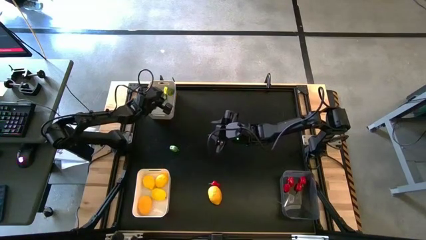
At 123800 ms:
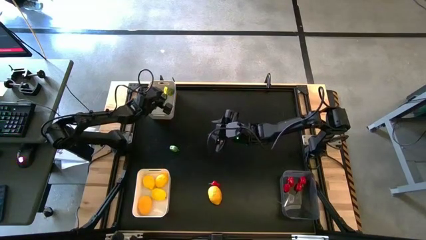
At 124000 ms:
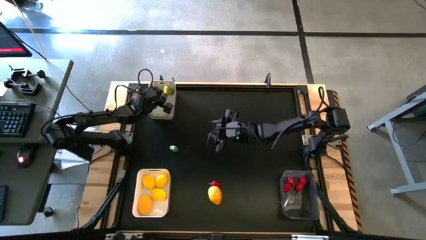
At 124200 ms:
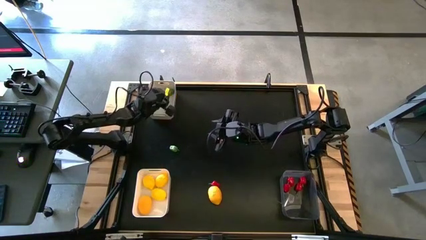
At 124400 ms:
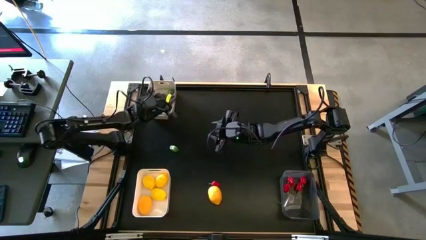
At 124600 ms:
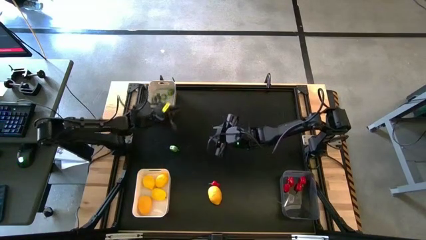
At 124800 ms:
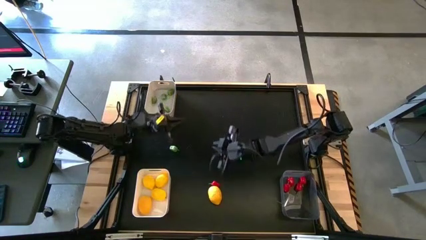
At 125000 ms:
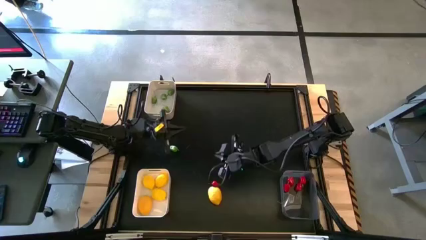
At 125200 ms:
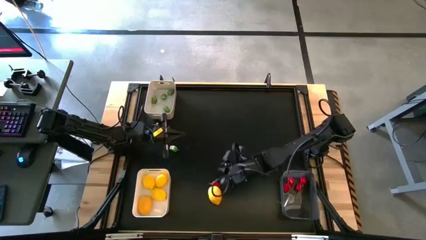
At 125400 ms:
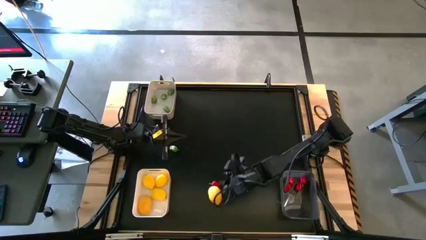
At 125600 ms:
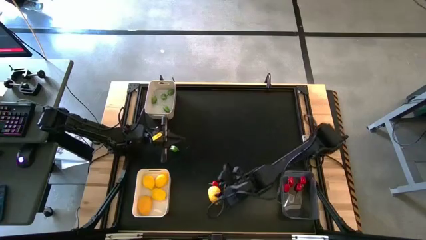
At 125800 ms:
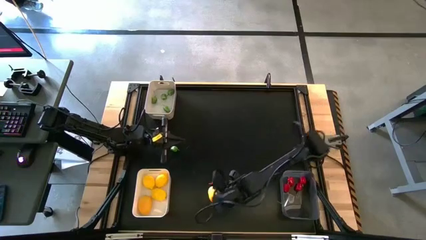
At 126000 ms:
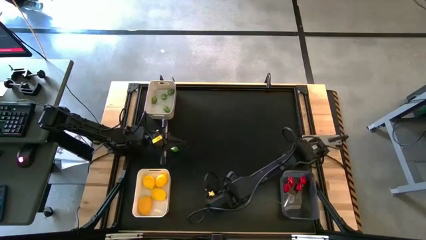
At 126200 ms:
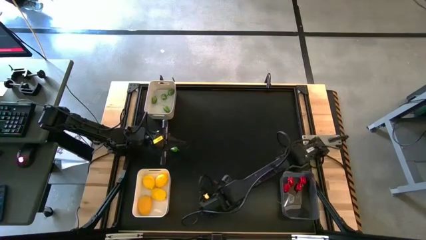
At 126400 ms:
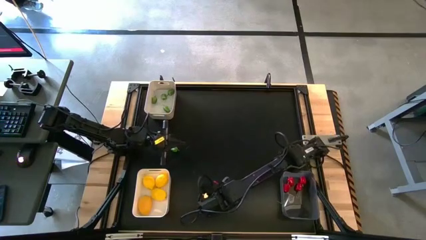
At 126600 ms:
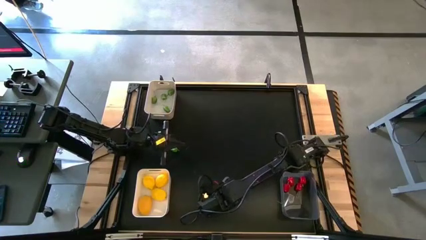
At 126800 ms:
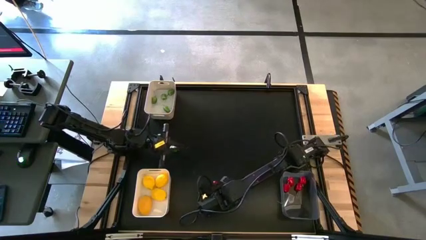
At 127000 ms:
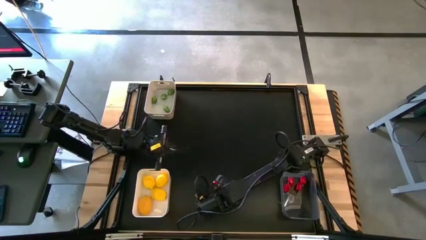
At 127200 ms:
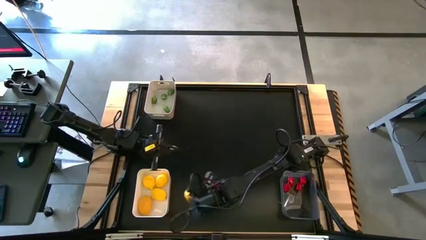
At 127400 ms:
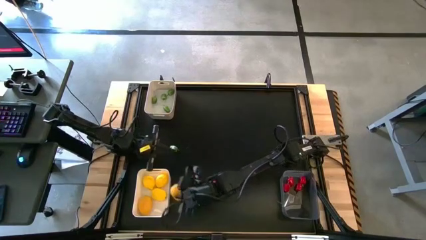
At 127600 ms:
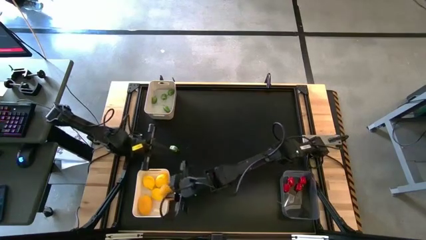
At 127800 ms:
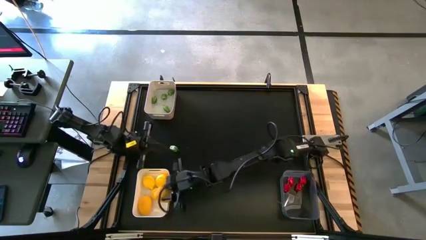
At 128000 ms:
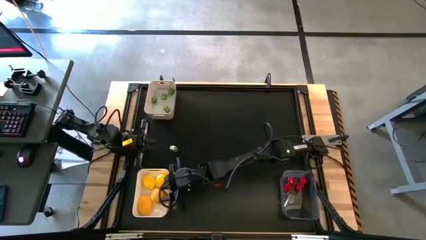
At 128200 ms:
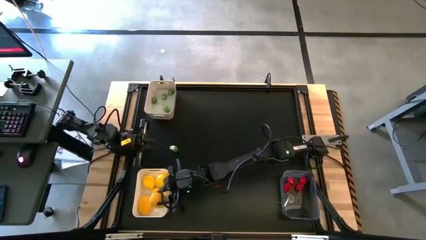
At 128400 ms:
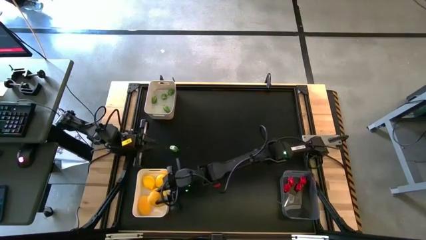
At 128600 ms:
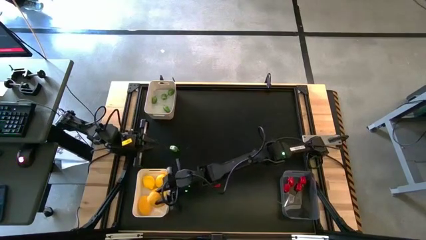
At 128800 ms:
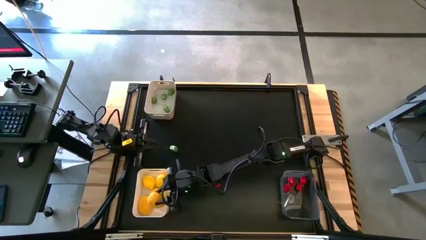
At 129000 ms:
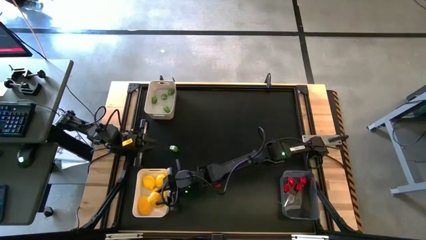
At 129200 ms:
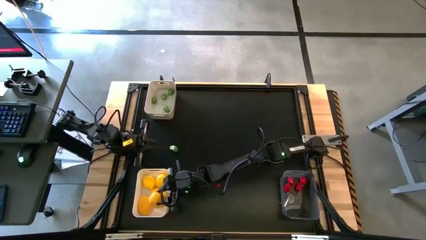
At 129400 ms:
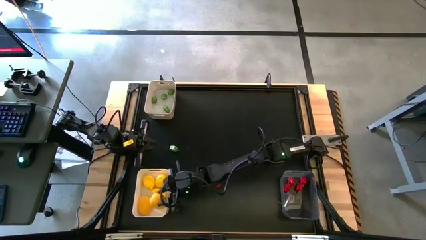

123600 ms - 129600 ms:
Task: Sort produce into baskets
Put the yellow lemon into the white bin

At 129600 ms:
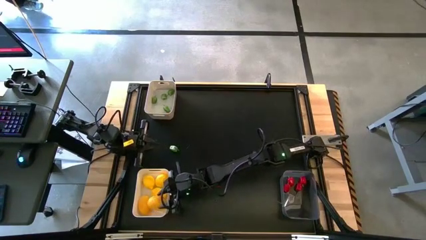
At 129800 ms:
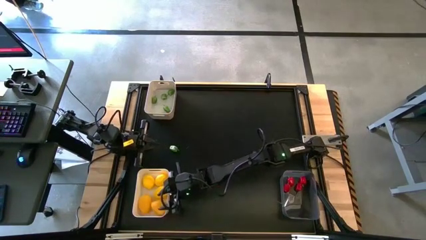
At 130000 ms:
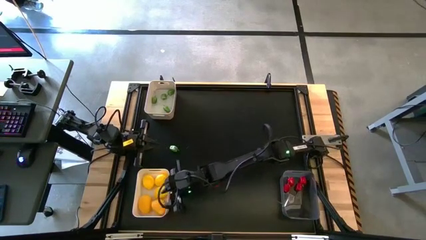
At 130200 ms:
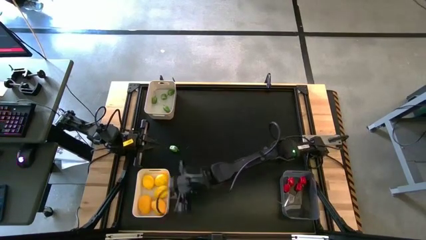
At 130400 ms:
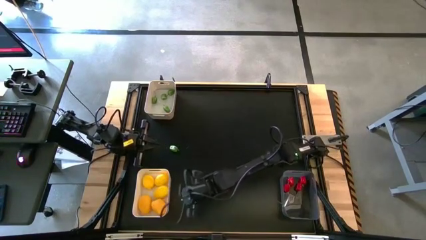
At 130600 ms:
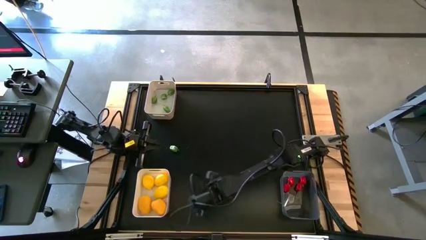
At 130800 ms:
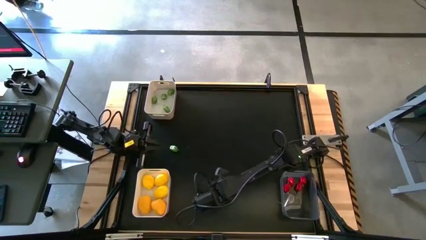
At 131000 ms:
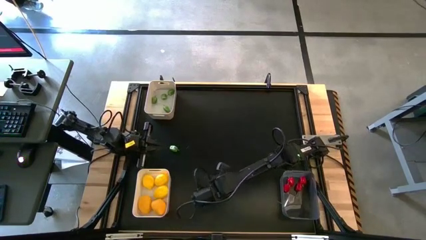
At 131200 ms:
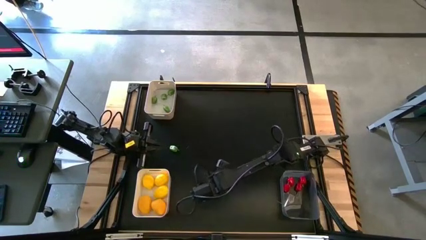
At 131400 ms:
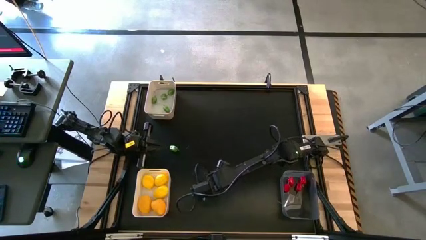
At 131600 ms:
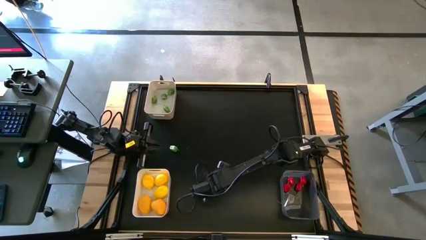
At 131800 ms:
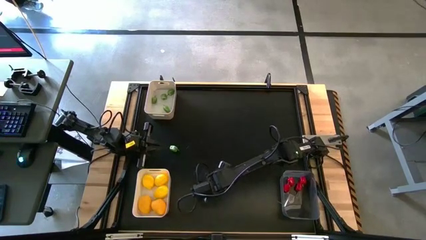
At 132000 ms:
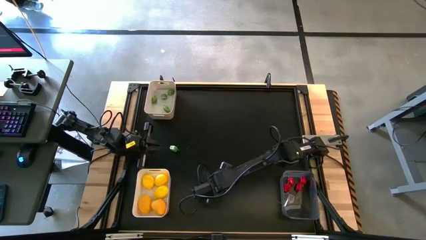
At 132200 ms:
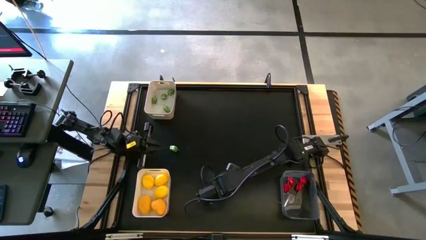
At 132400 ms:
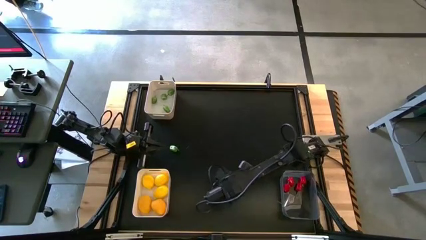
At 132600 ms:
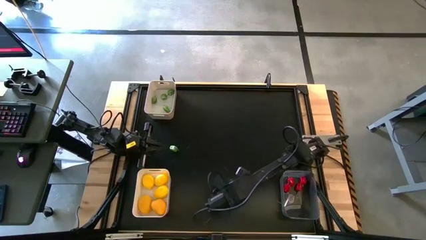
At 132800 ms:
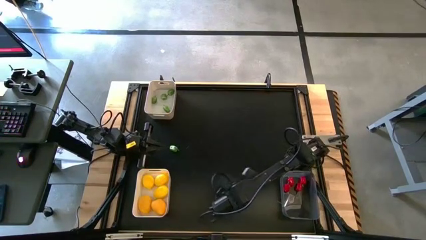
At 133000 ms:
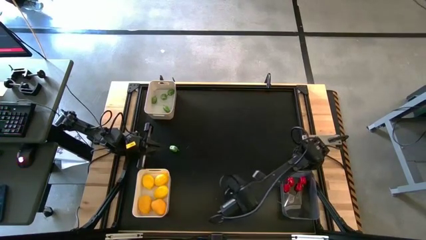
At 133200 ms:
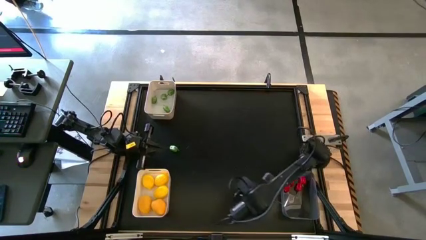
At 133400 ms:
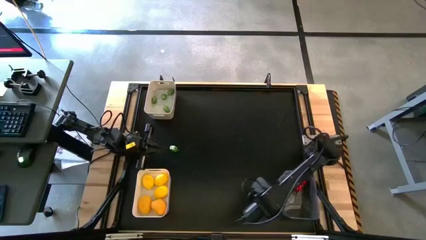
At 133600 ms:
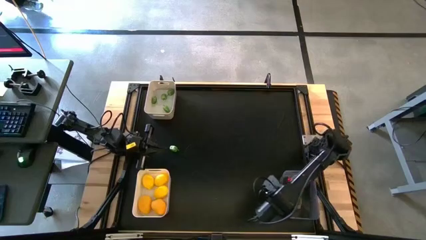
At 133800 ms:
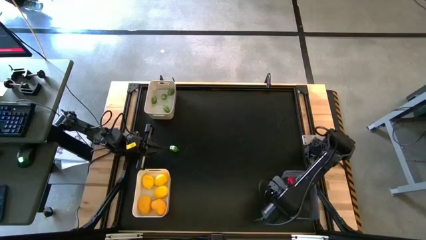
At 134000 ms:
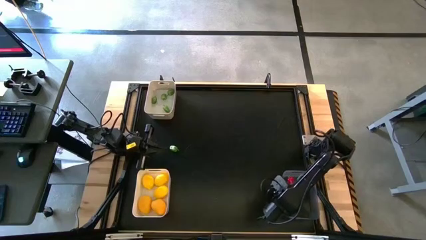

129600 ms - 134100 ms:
Put the red chili pepper into the black transparent bin

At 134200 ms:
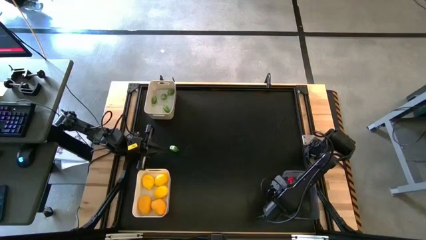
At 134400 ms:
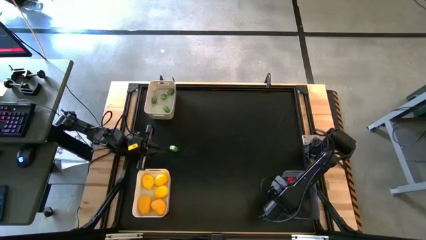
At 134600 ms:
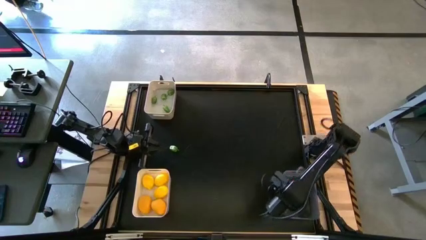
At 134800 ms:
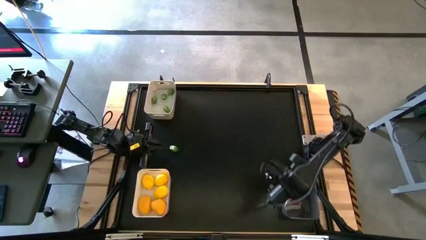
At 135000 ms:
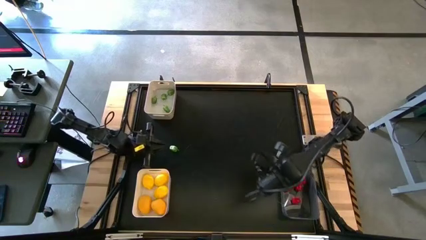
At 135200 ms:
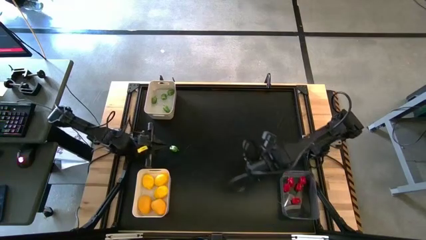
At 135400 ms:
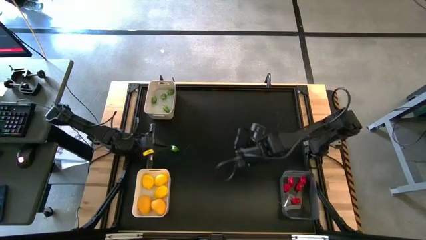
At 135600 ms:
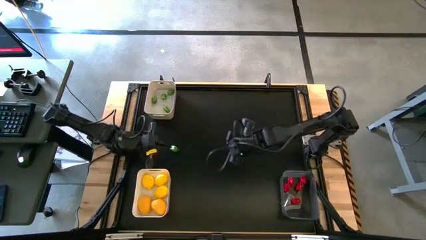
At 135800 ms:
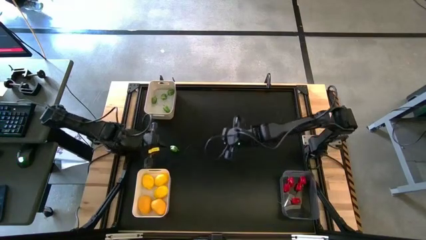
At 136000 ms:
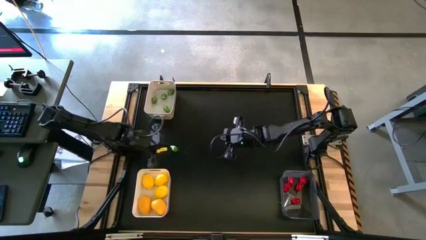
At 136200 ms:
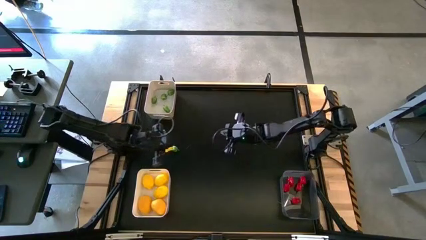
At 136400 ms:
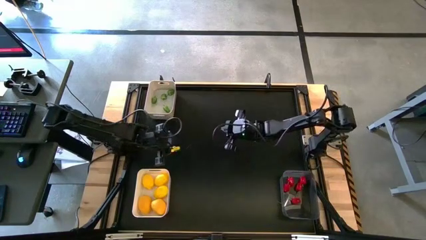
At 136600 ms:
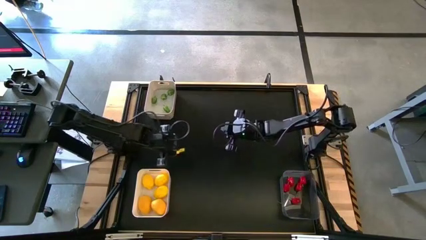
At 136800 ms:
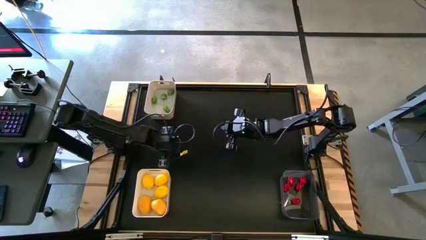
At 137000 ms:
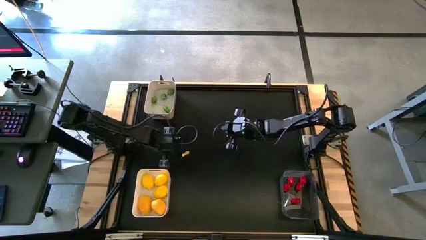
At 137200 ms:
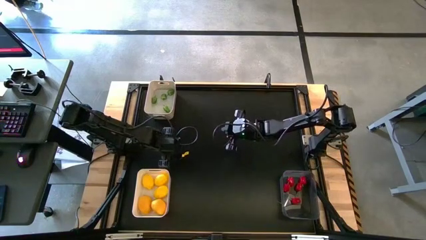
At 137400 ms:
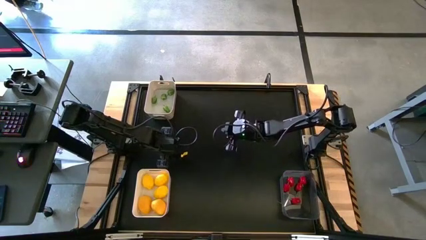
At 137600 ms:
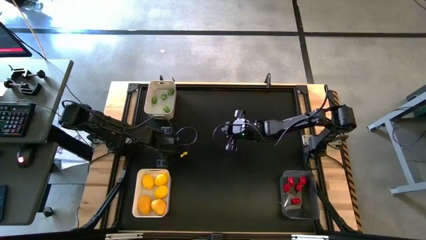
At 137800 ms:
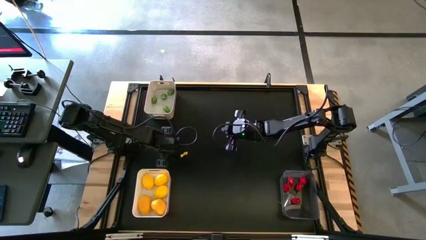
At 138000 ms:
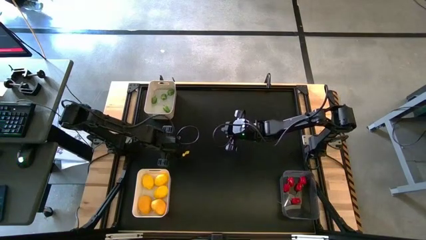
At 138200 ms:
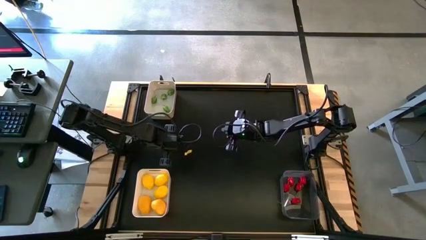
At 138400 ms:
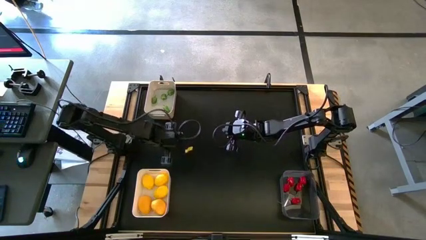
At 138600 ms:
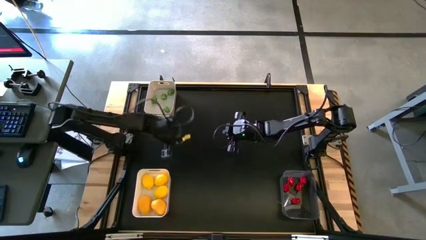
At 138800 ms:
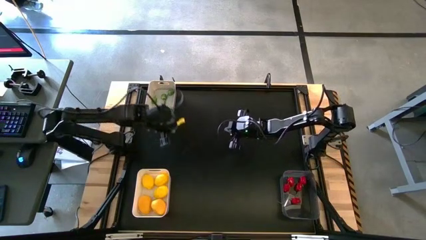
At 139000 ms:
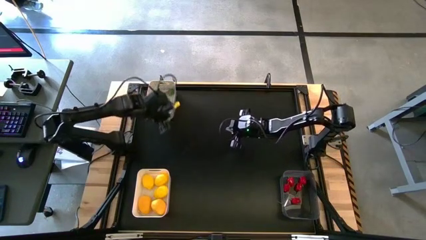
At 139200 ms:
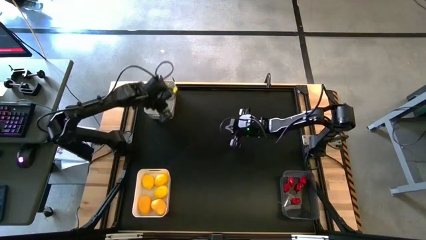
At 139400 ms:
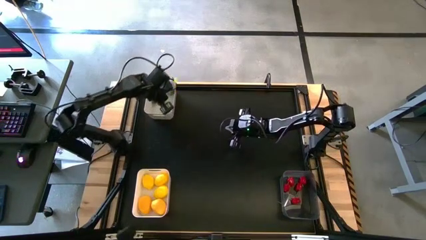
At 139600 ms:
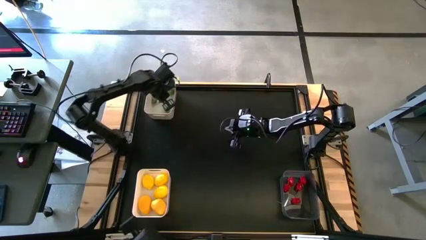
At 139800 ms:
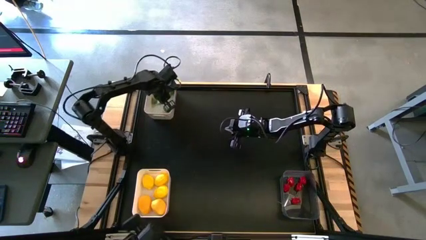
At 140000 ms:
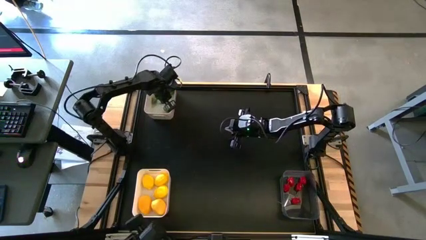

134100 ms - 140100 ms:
Put the green chili pepper into the gray bin
